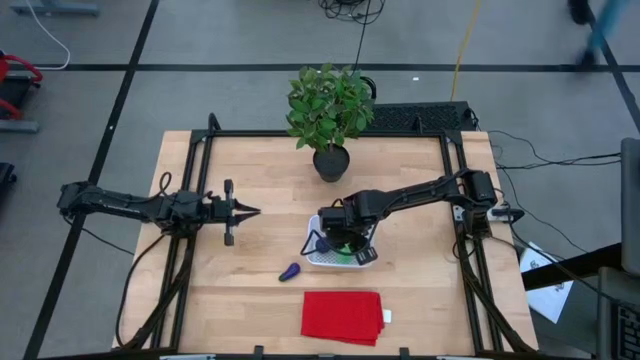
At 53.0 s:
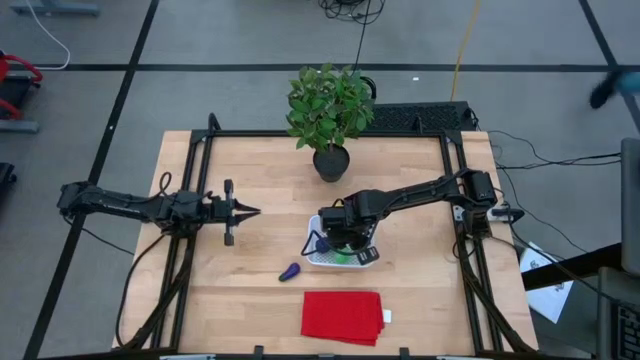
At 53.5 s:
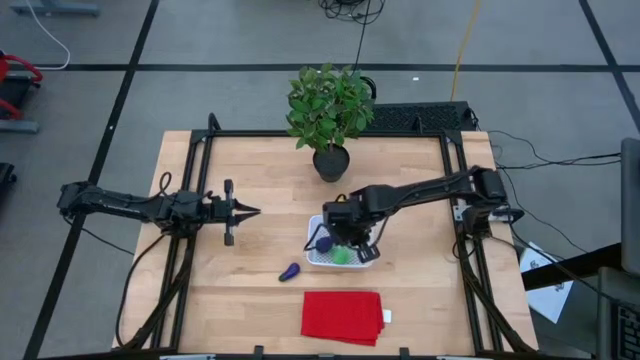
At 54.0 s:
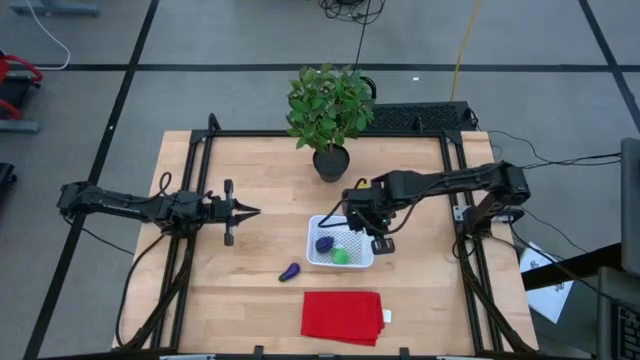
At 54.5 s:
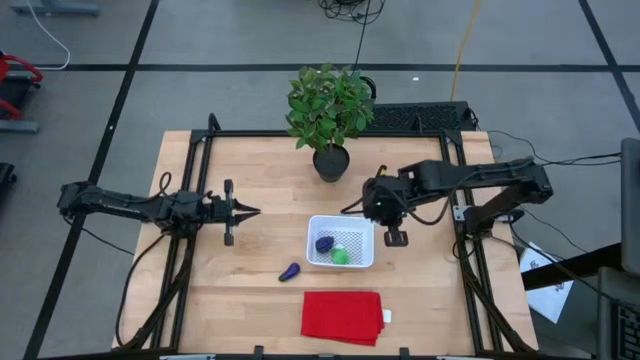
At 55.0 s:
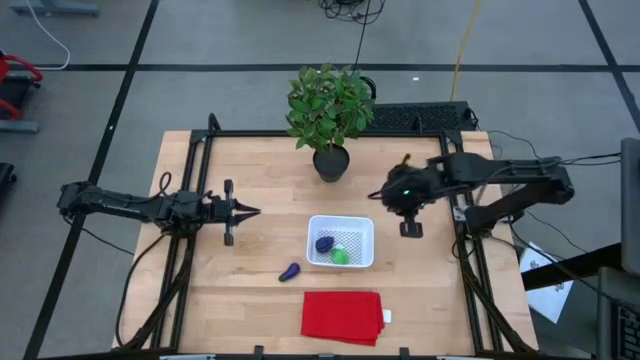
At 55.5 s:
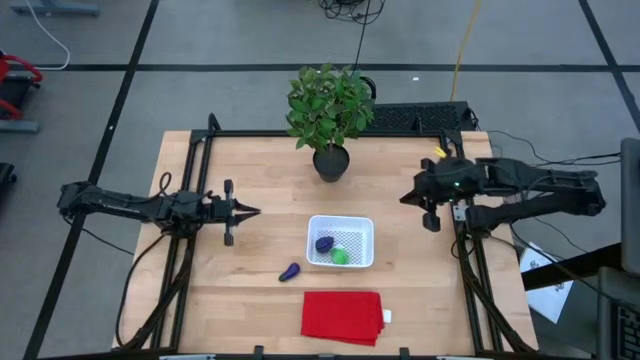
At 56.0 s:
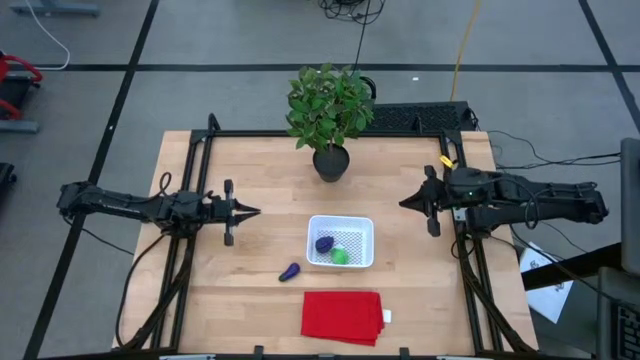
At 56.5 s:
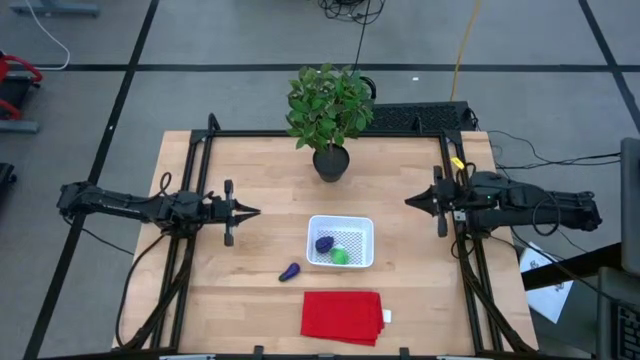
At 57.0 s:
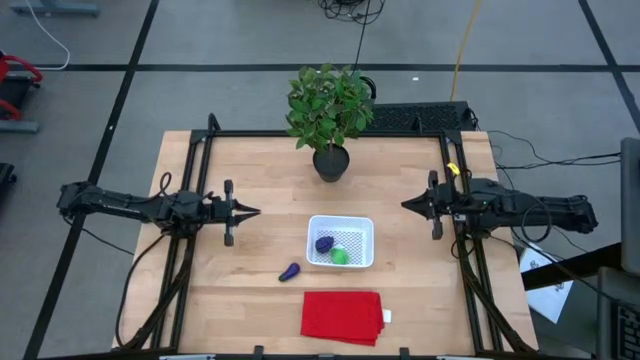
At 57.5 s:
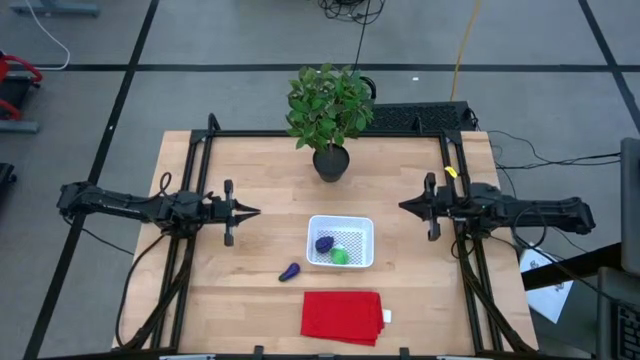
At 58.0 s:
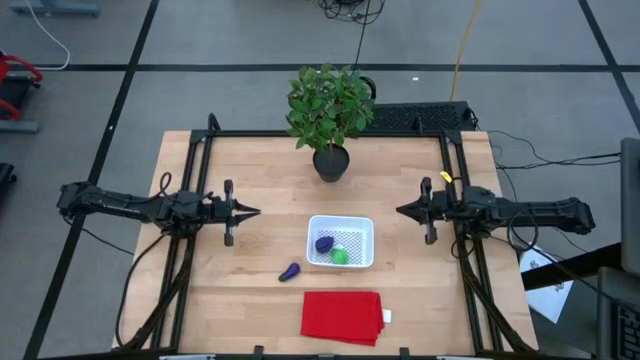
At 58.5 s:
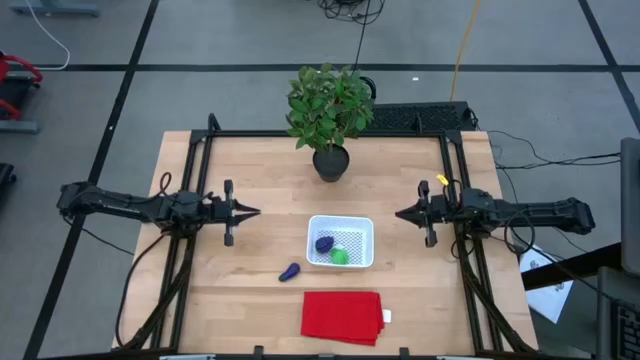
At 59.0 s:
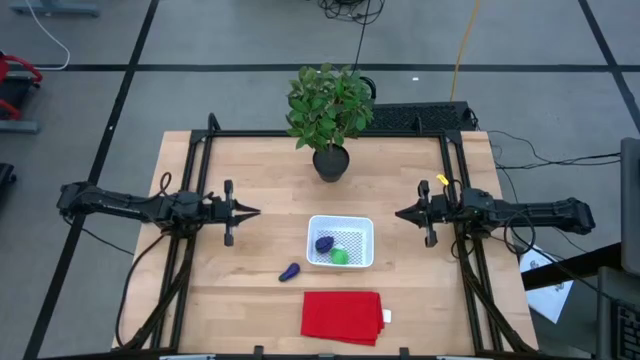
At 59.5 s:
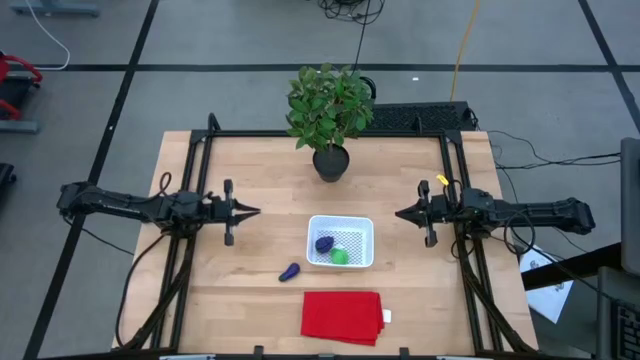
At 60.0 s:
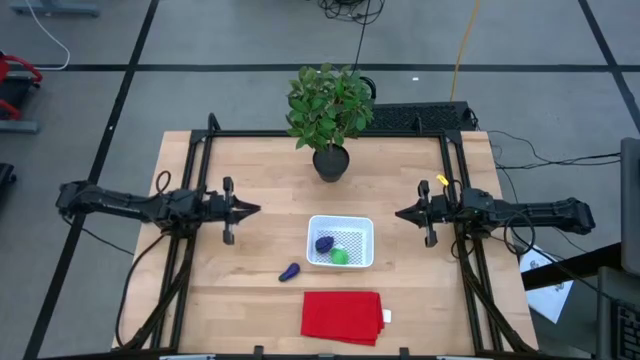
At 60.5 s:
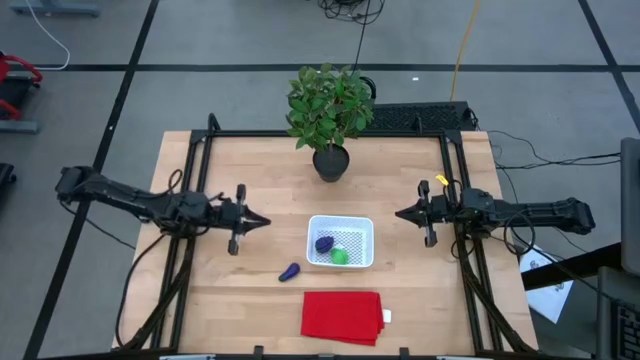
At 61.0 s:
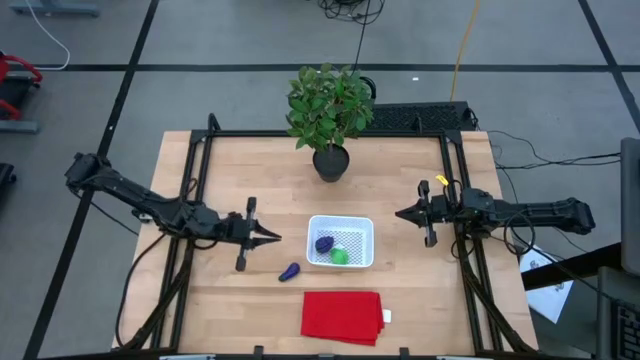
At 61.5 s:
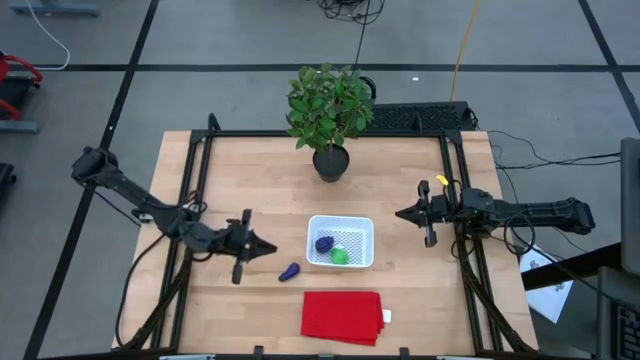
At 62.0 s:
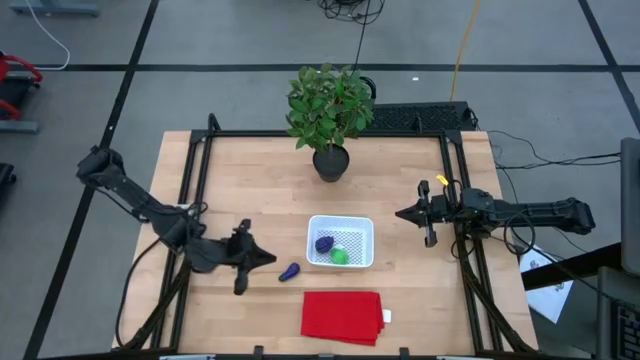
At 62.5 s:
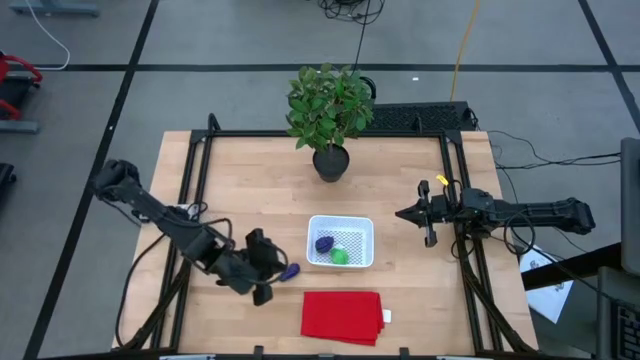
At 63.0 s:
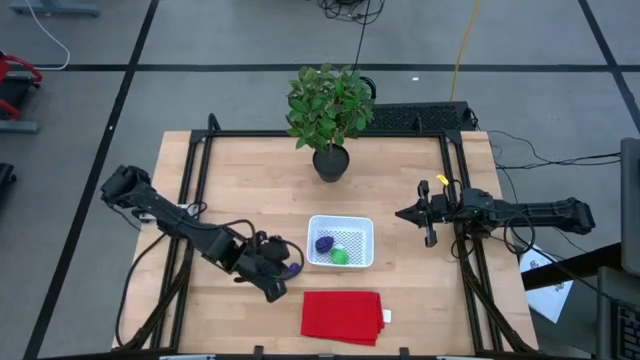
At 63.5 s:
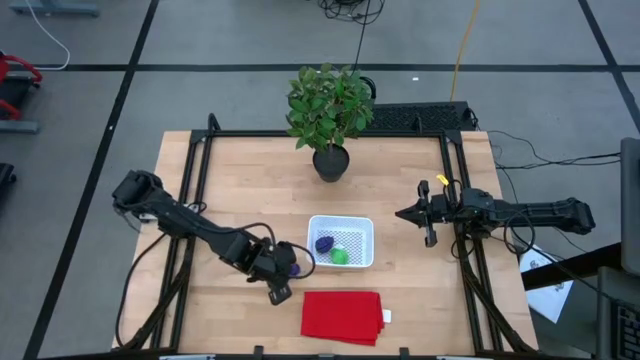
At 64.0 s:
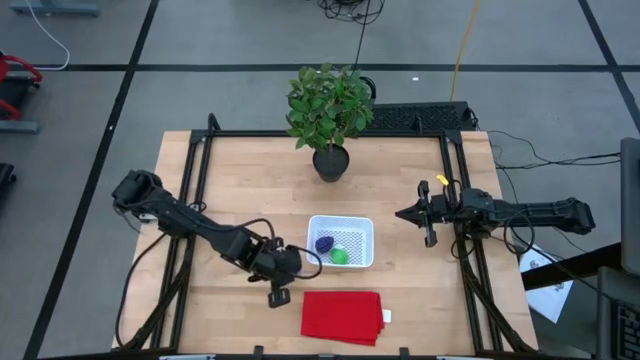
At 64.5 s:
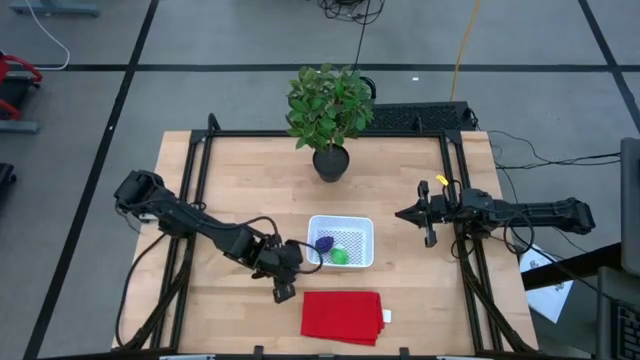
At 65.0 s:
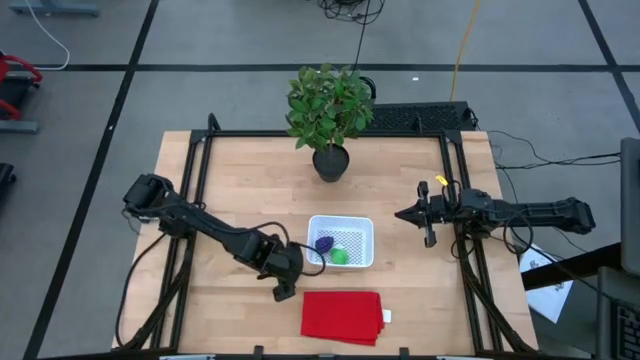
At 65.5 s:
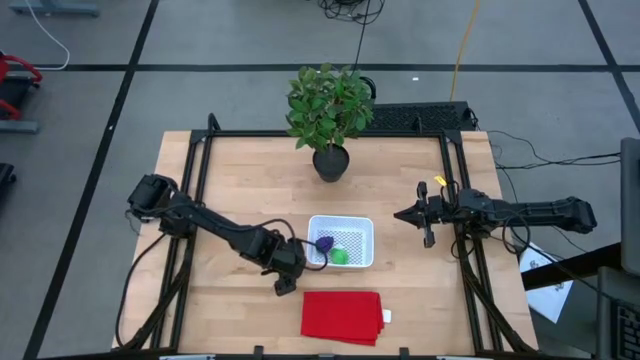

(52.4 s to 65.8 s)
Task: Pick and placing Produce into tupperware
Put the violet eggplant into the white bin

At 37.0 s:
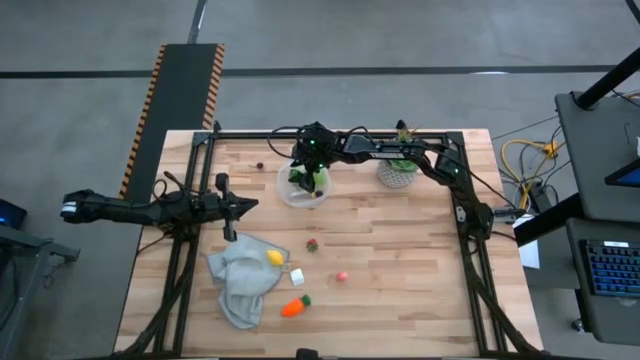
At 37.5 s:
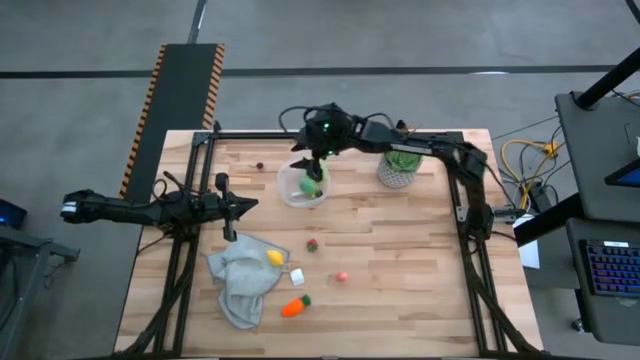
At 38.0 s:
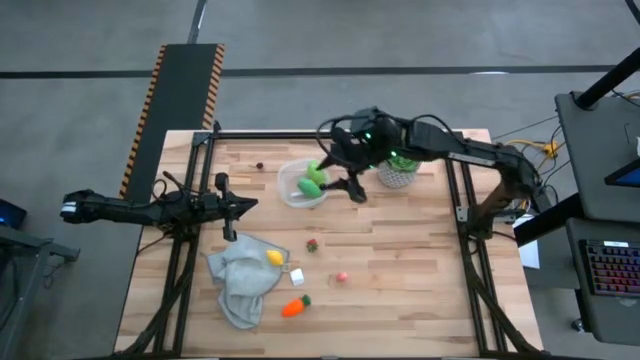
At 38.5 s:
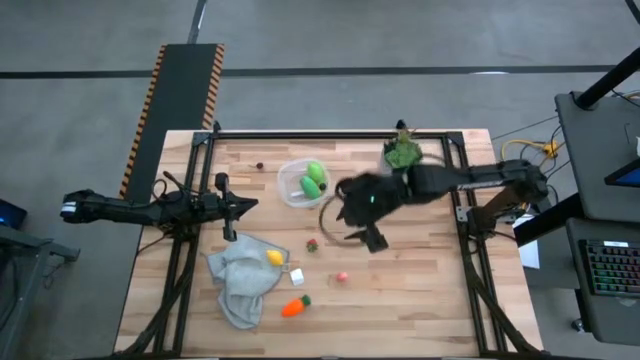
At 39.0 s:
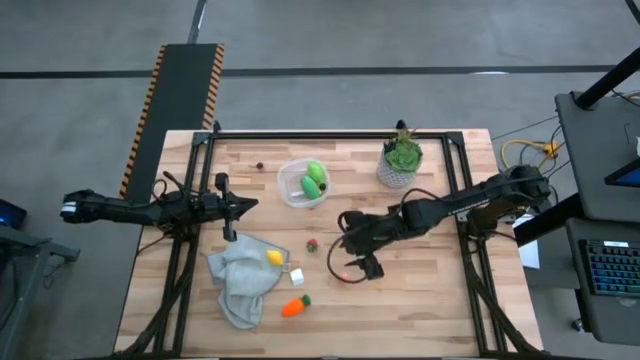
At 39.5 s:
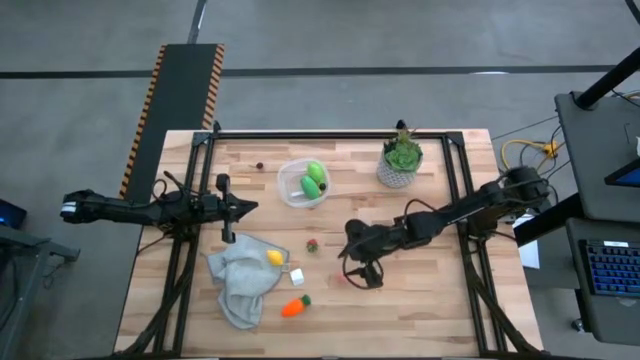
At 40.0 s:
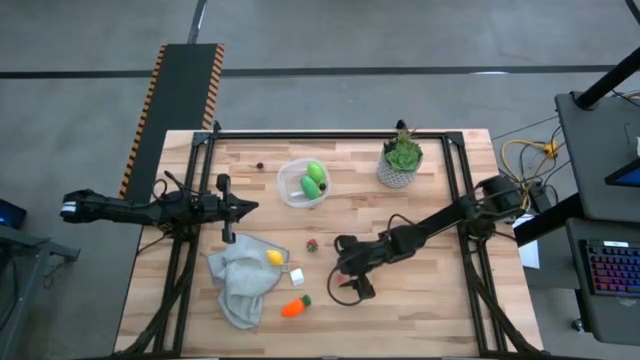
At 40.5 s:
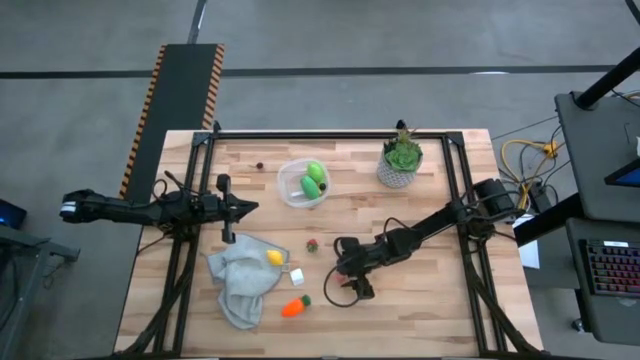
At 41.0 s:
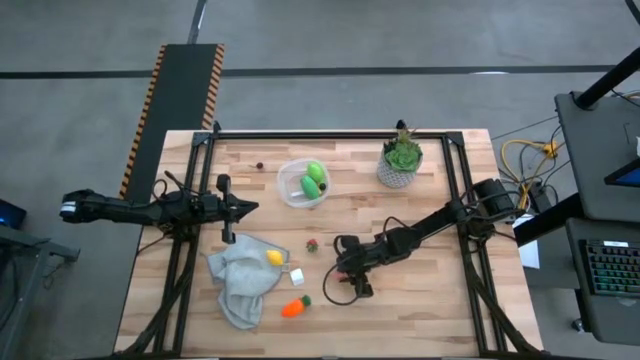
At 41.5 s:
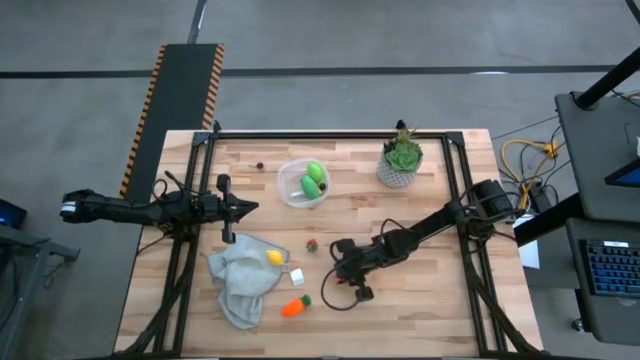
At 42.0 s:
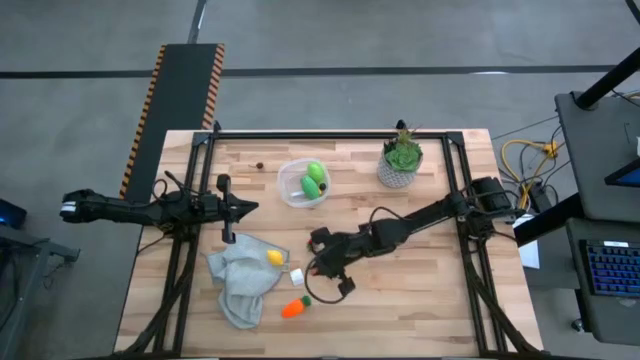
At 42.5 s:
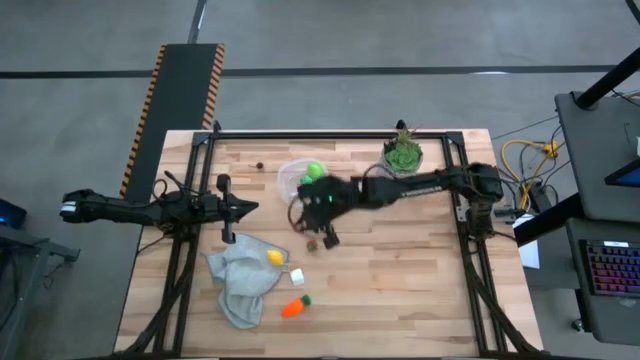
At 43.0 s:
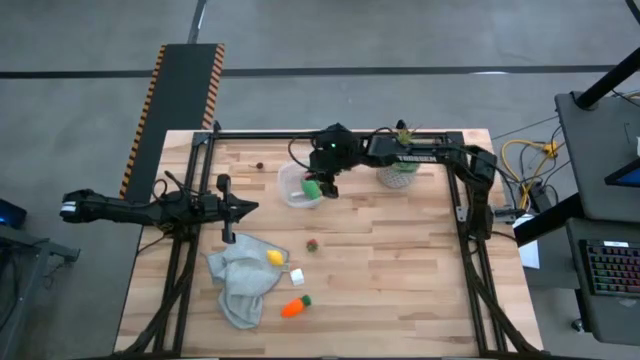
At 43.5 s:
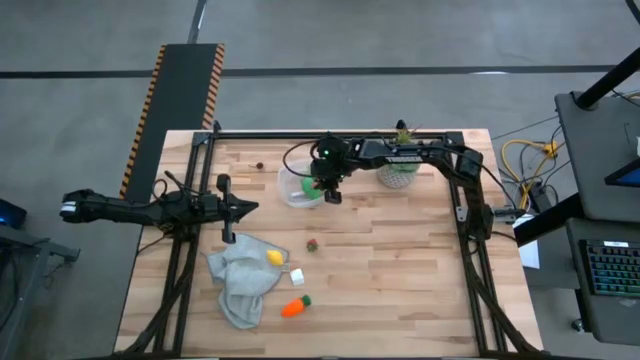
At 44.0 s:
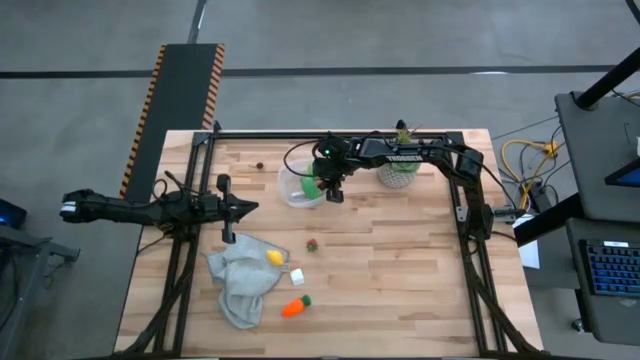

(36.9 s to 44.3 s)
Task: Pick and placing Produce into tupperware
Put the pink peach into the transparent bin
